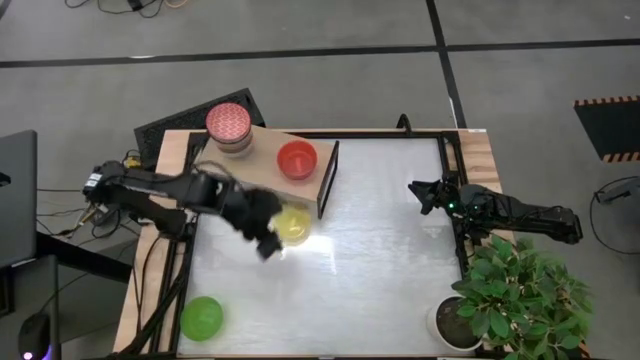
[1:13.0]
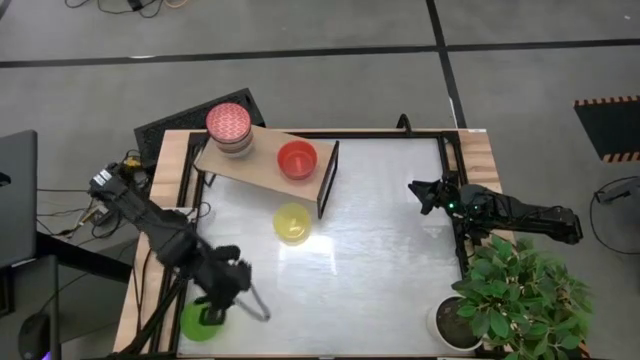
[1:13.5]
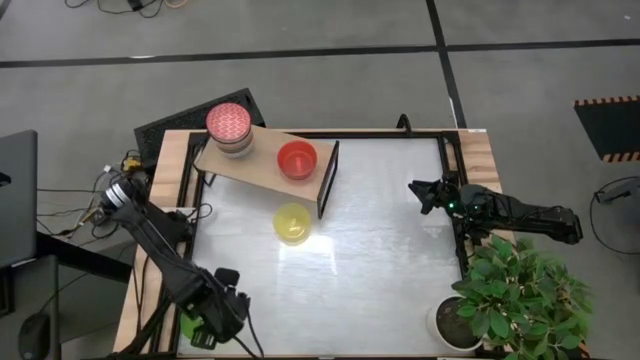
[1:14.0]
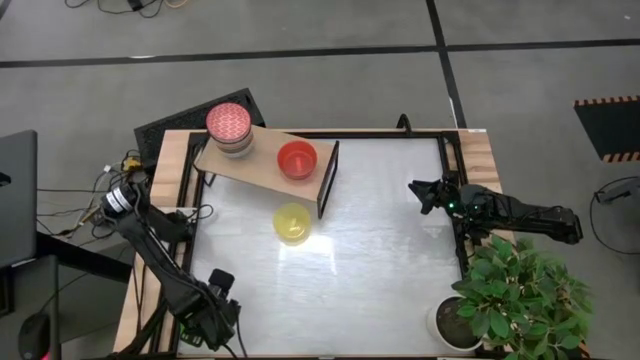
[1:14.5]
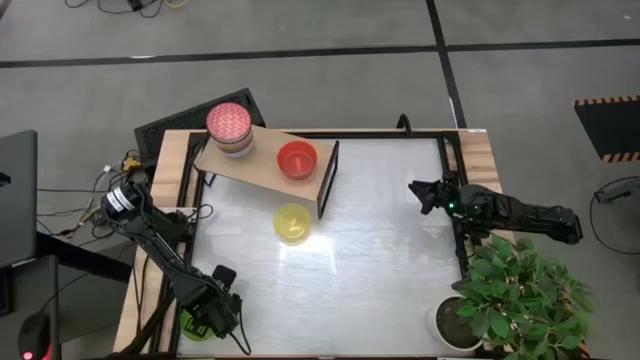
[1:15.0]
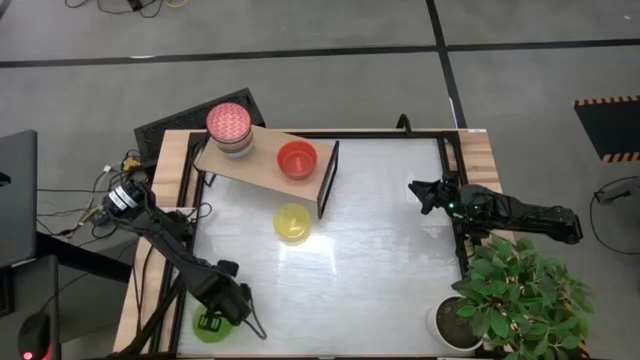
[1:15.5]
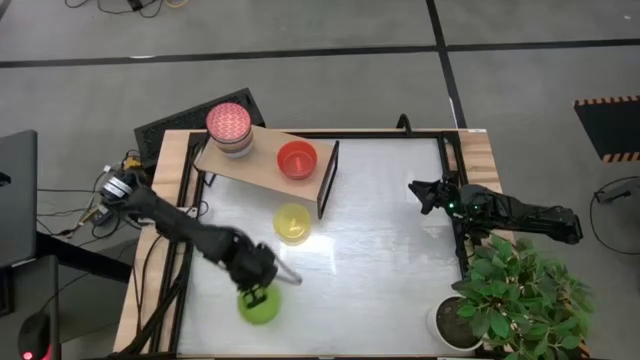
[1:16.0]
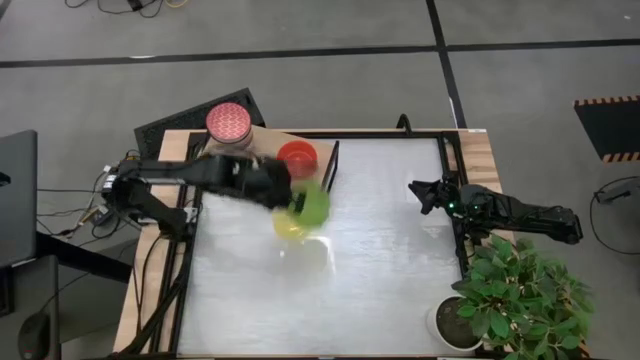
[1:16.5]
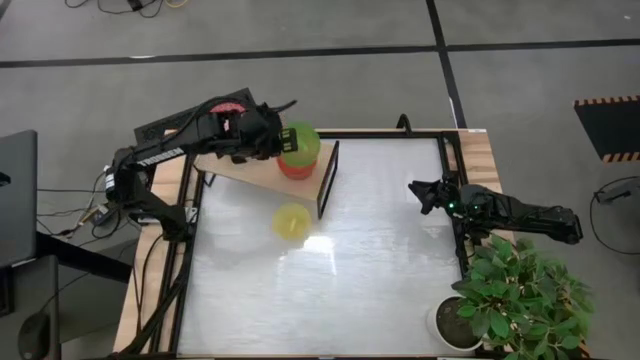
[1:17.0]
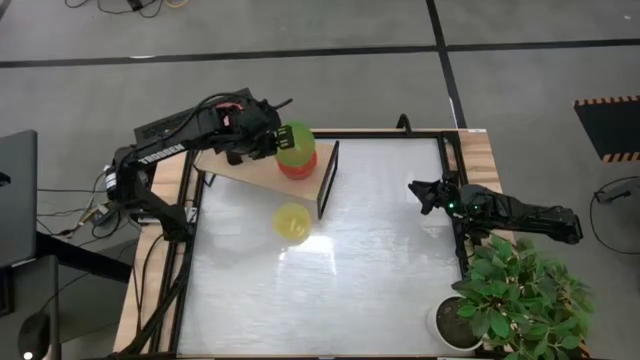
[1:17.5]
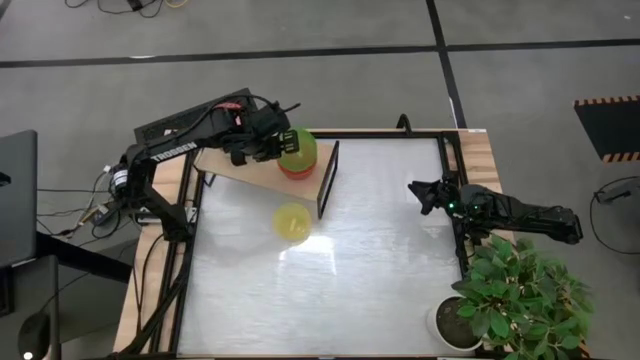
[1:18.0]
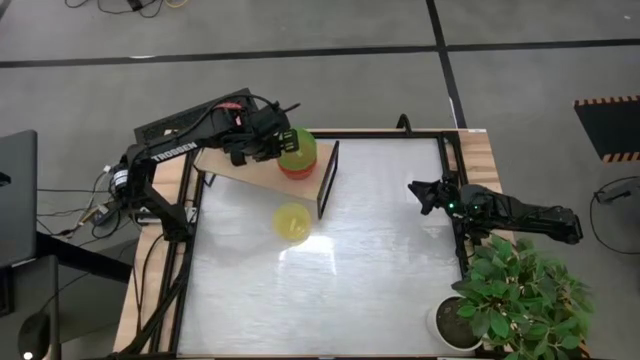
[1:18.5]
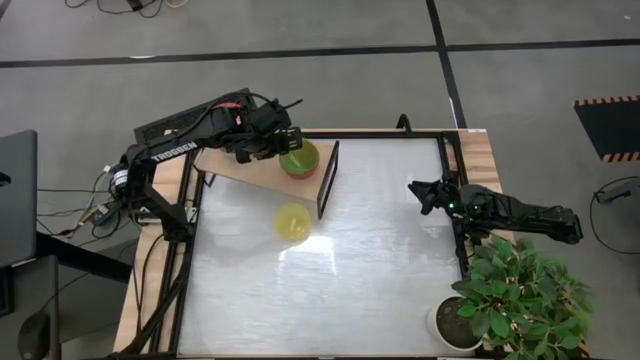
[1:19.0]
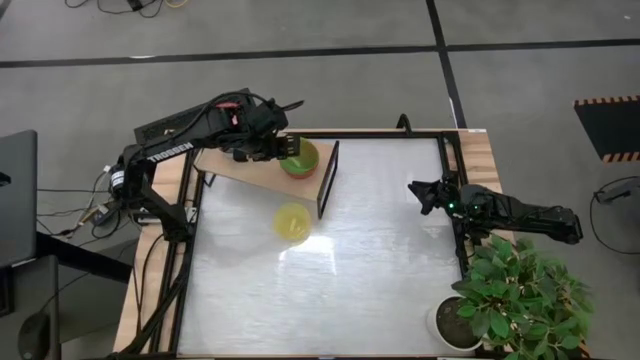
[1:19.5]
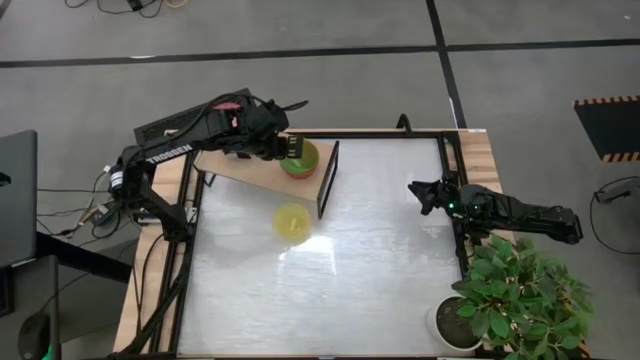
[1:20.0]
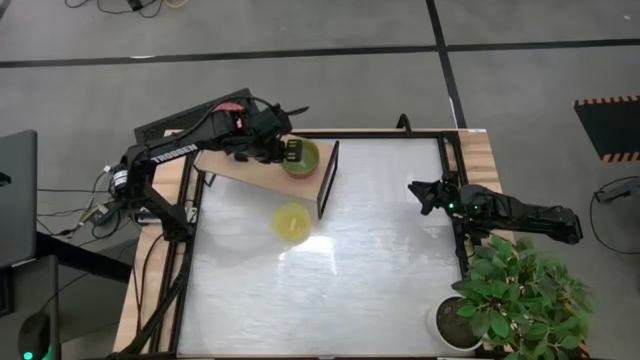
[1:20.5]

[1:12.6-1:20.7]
Task: Place and stack bowls onto a shelf
Stack the green bowl on top of the orange bowl on the shelf

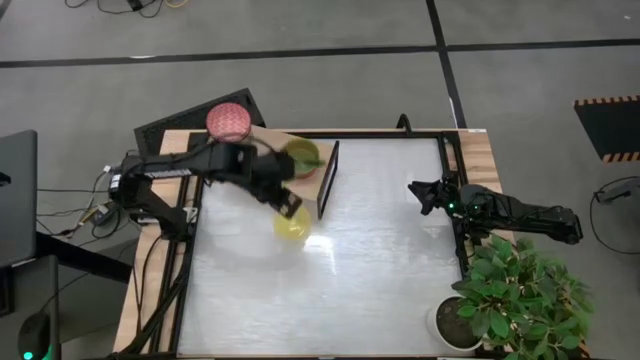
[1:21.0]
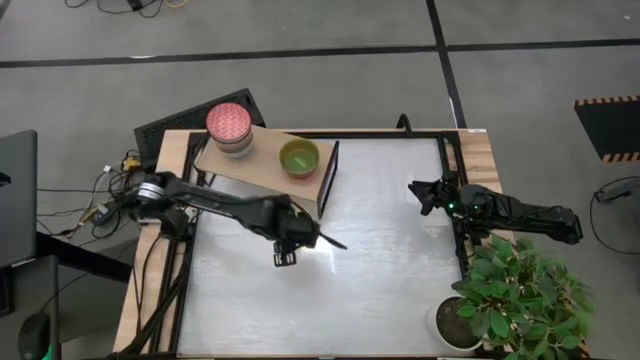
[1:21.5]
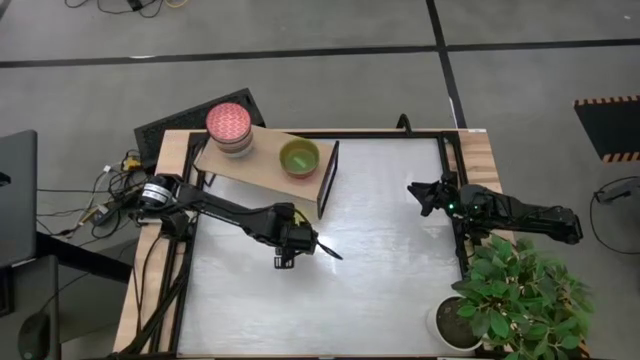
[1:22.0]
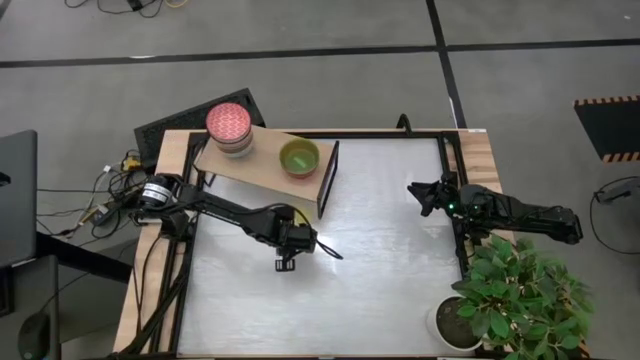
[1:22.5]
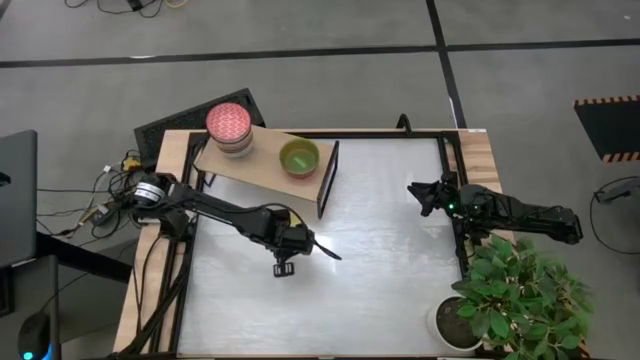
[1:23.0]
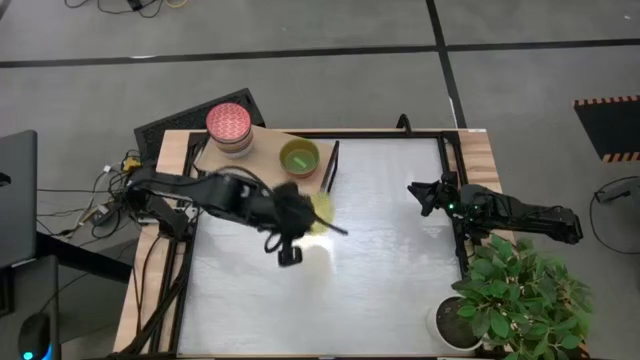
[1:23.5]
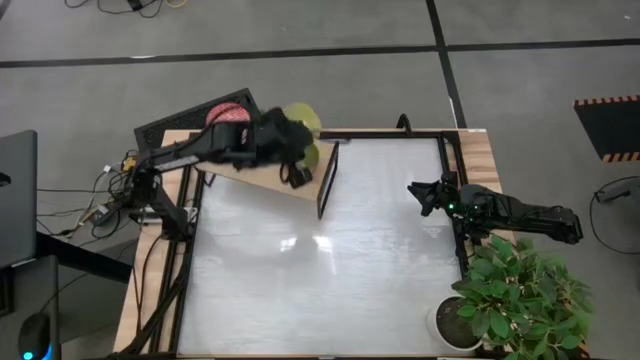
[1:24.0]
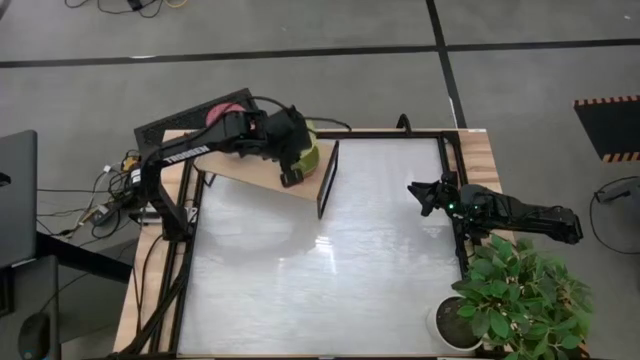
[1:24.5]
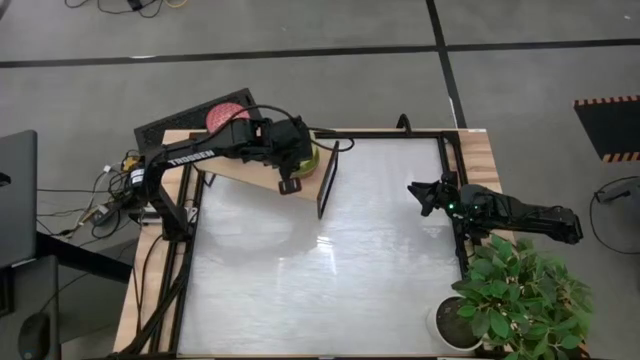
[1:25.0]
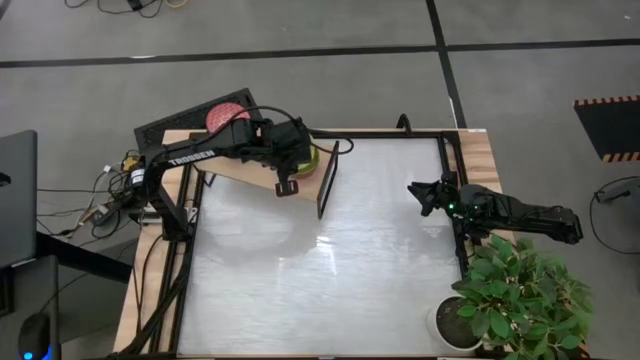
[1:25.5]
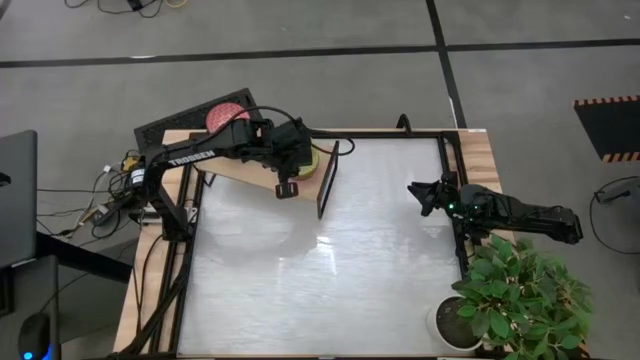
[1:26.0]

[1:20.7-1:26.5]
Stack the yellow bowl on top of the green bowl on the shelf

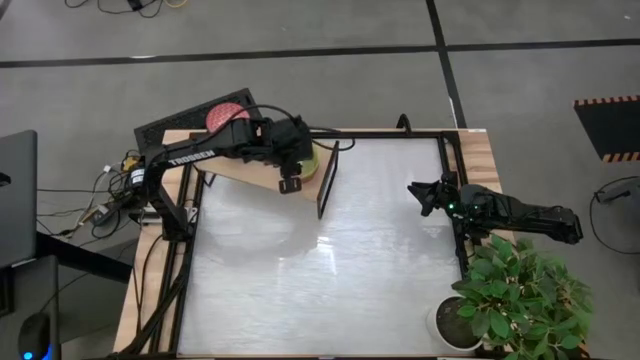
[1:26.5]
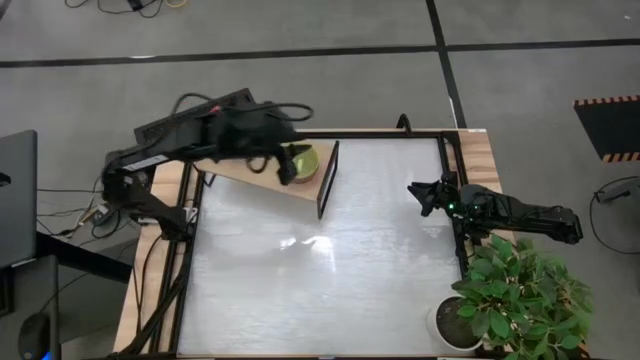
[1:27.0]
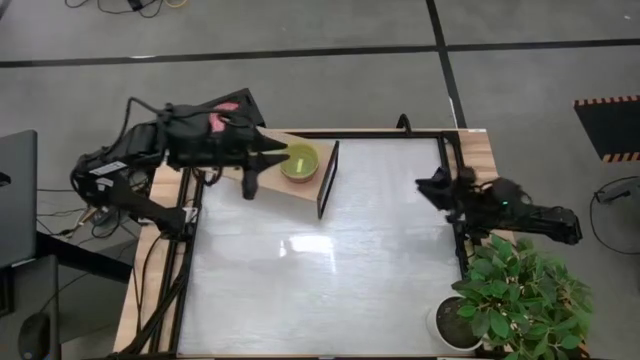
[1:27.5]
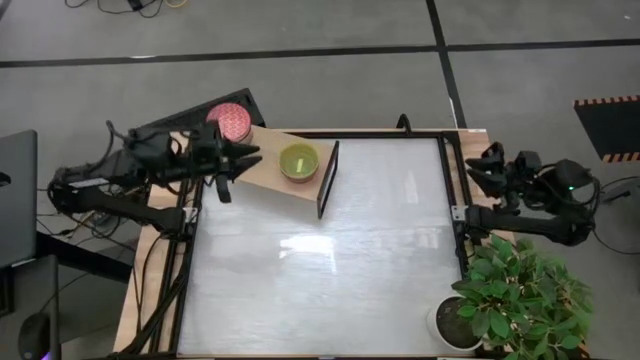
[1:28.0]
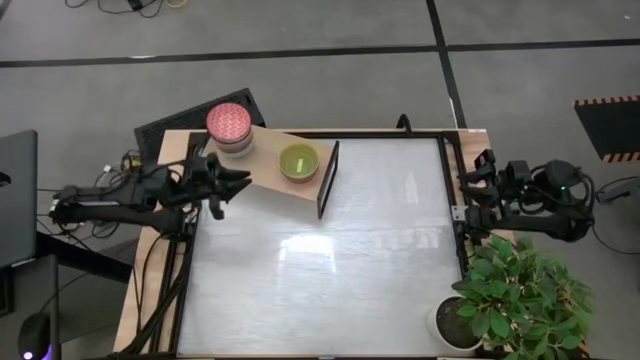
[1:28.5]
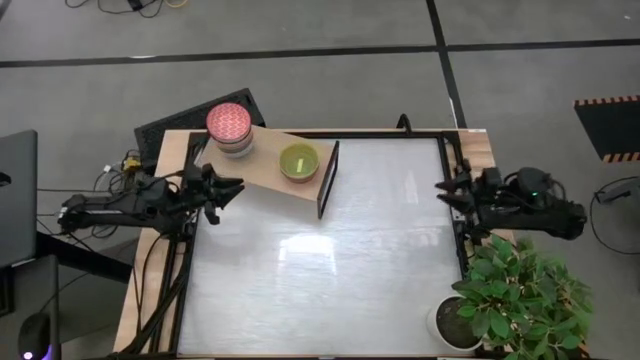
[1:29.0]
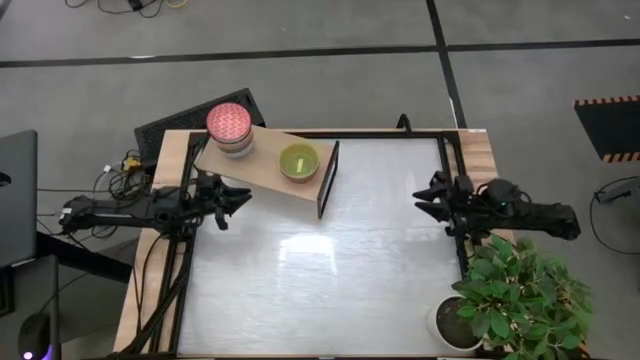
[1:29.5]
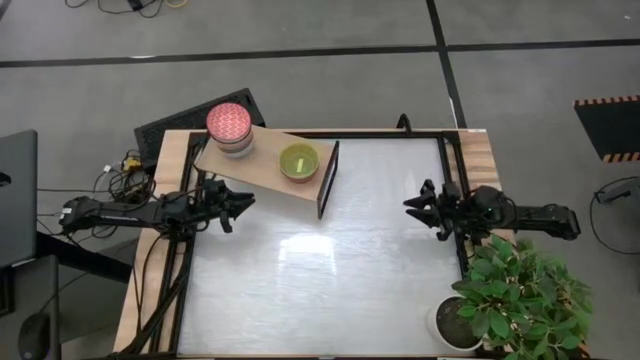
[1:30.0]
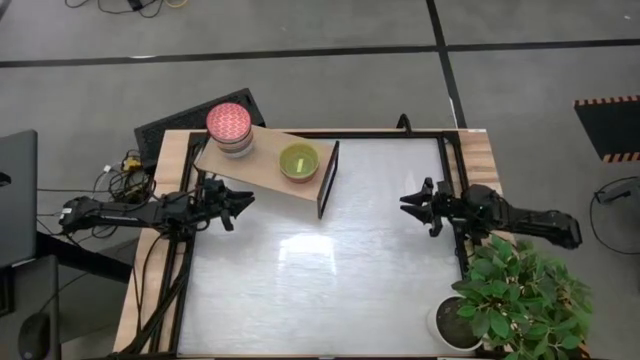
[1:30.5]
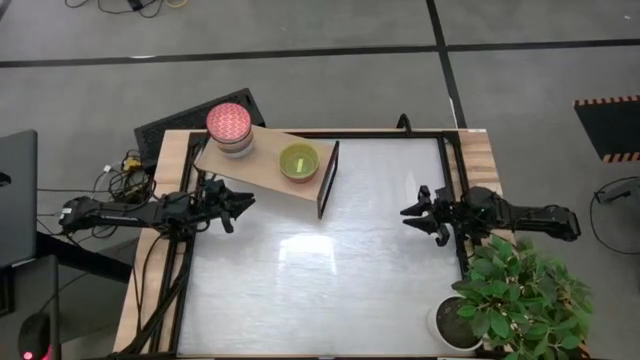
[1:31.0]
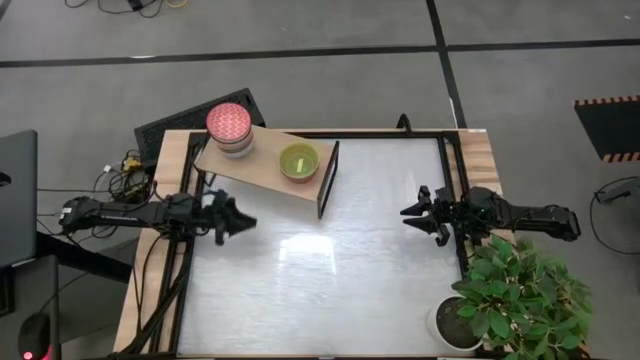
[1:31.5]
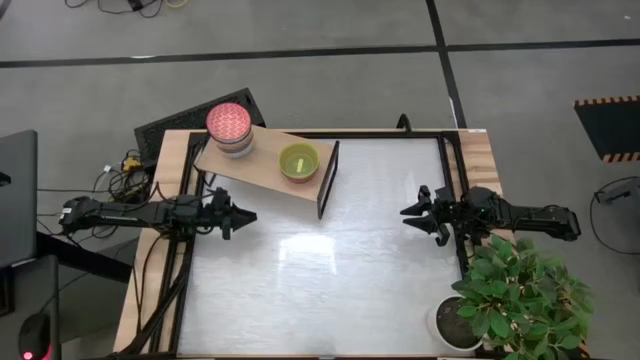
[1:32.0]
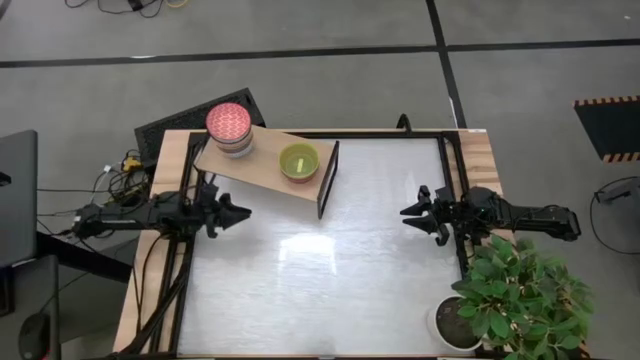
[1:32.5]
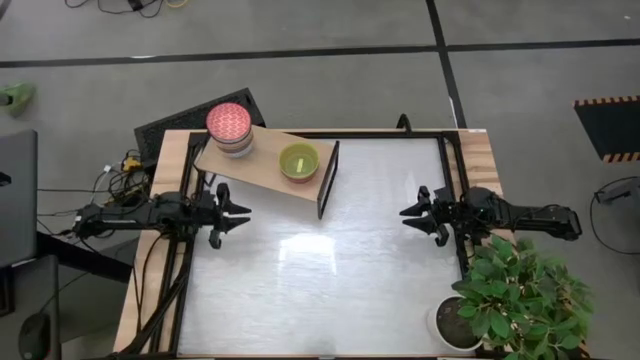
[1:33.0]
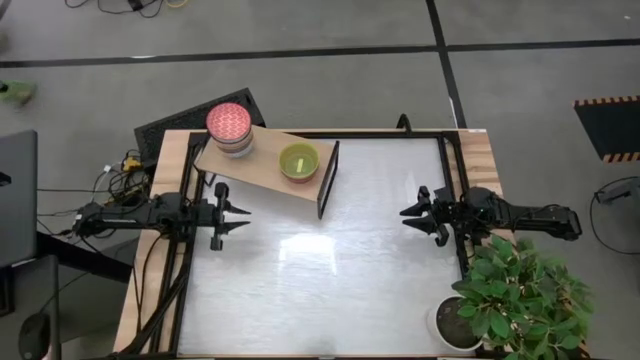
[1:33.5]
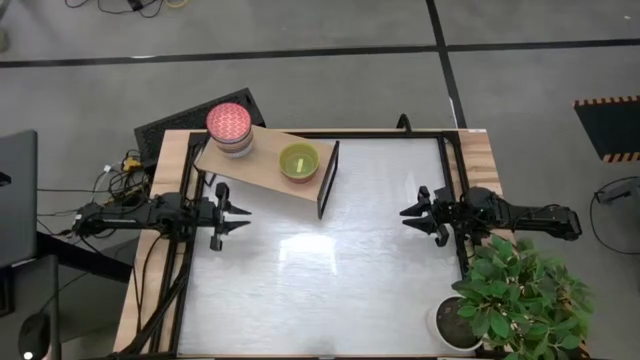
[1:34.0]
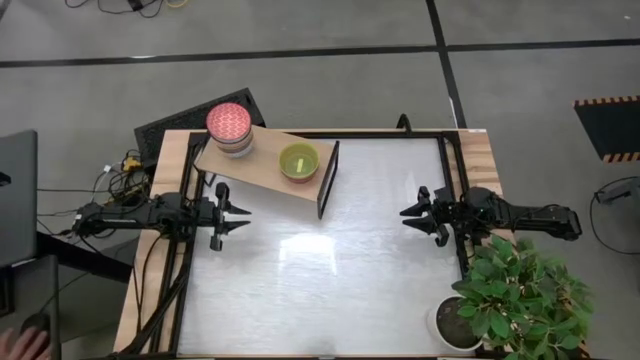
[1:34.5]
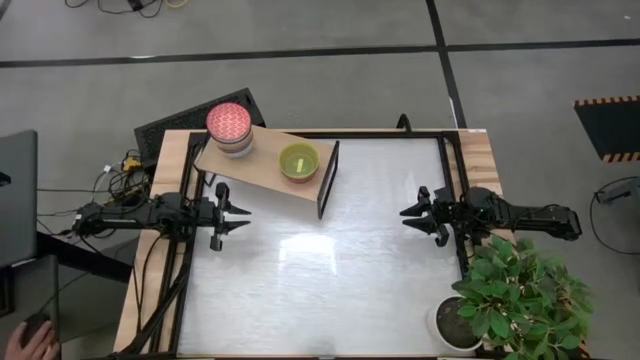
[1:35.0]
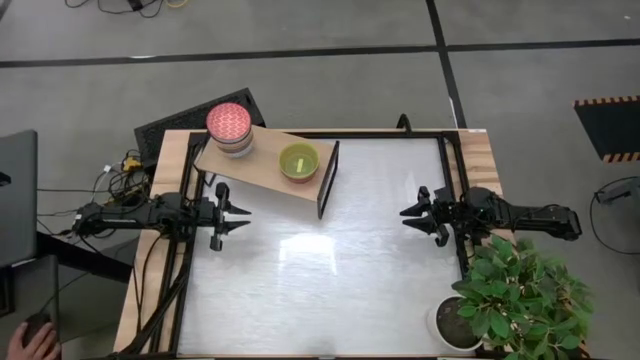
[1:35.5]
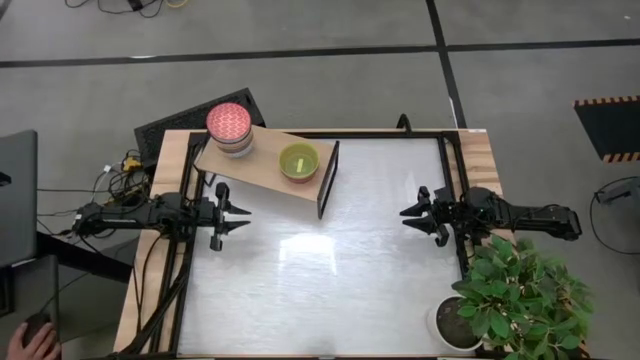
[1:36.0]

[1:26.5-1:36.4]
Return to Home Position
